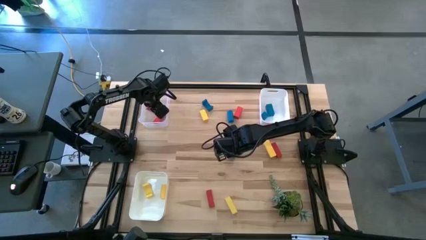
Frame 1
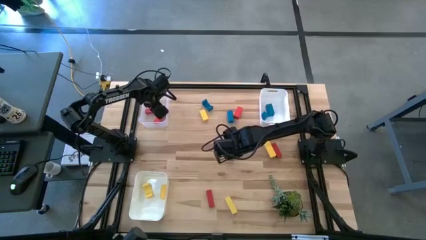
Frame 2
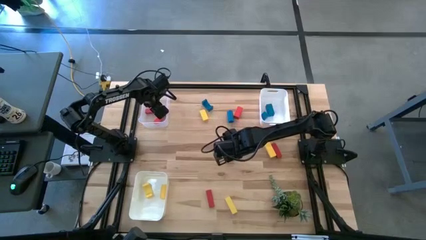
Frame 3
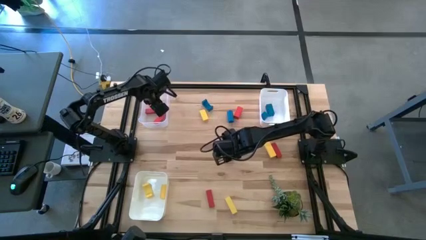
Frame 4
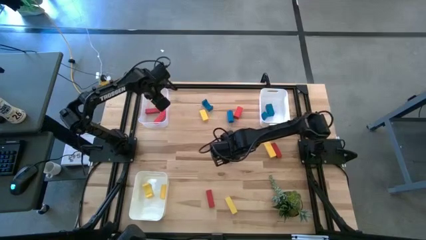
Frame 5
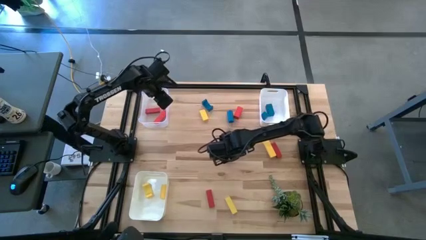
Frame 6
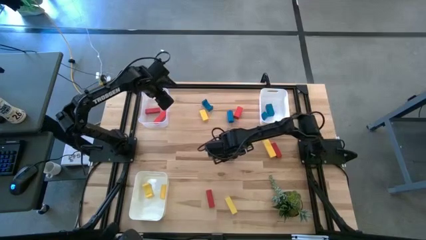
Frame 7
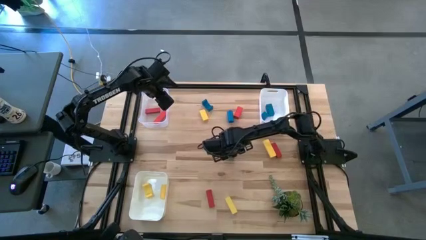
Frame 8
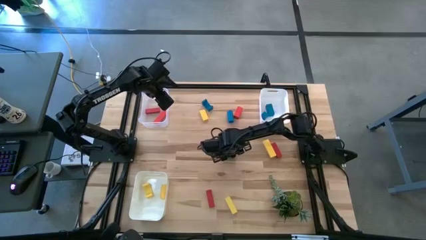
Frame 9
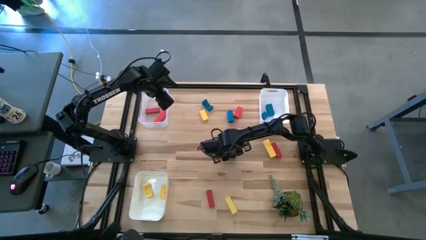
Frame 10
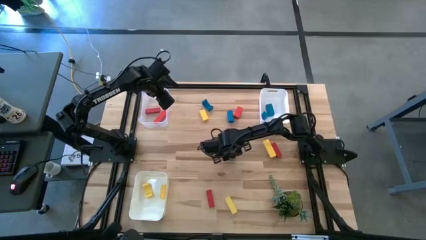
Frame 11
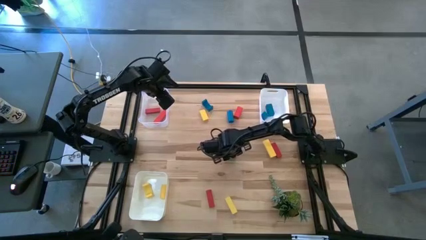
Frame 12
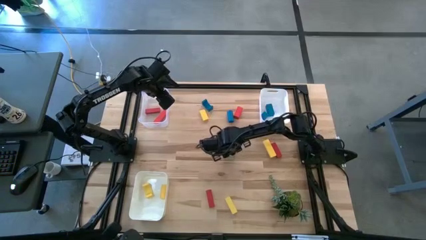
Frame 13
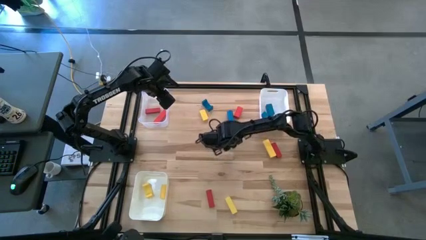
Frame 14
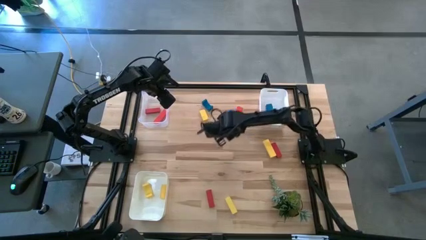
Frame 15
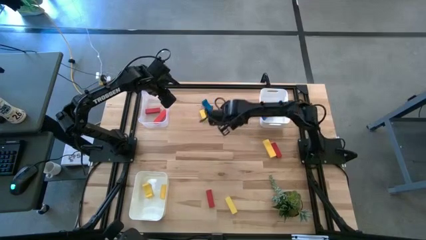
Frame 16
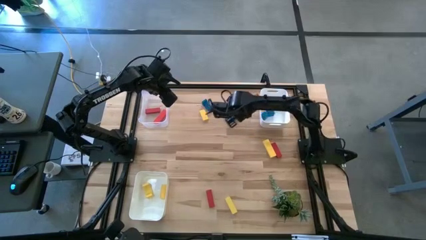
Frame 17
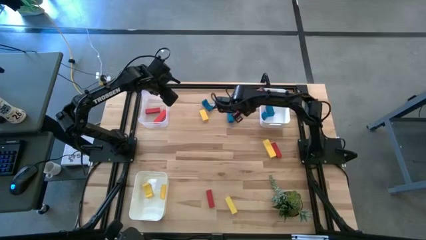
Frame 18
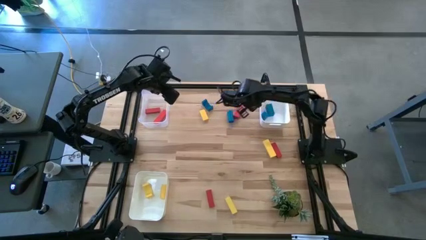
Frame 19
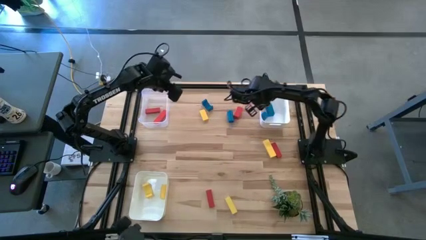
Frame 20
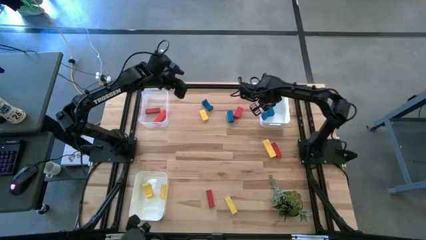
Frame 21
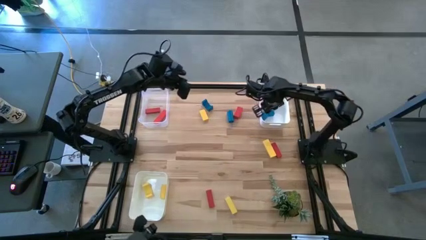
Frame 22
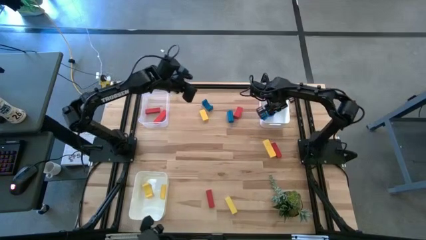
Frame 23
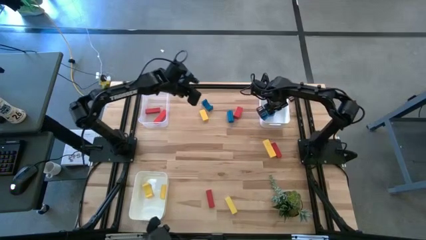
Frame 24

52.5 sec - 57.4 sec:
Task: Sort & place blocks by color
Put the blue block into the top white bin

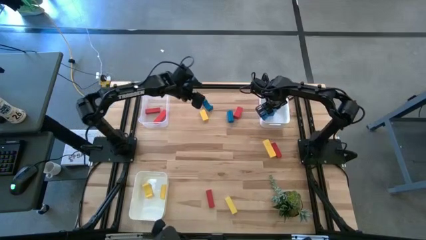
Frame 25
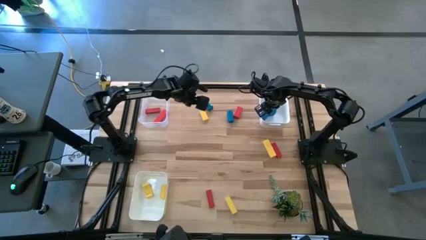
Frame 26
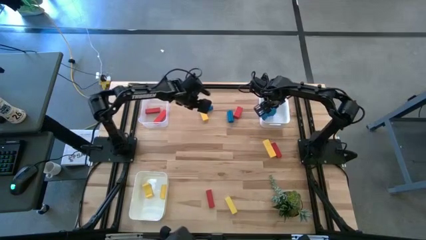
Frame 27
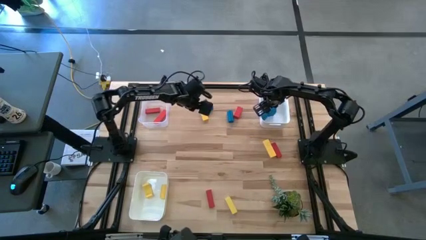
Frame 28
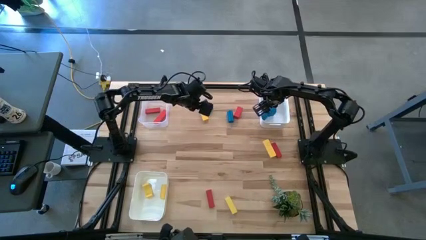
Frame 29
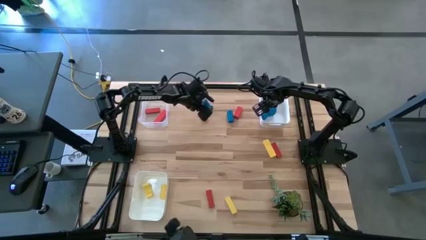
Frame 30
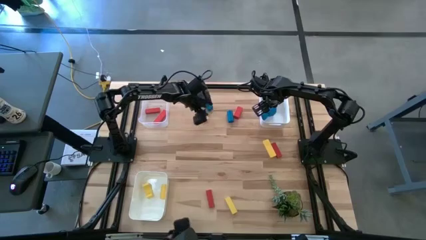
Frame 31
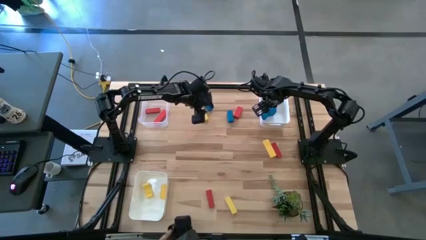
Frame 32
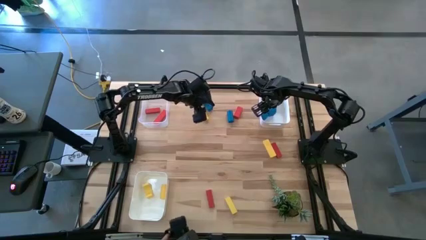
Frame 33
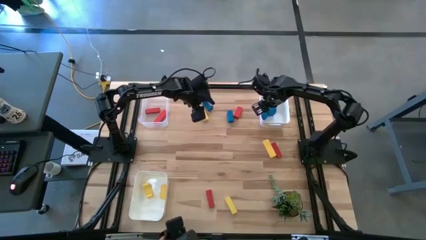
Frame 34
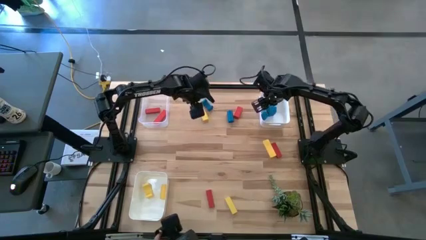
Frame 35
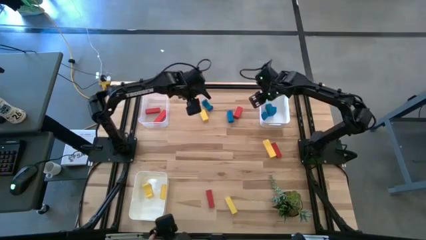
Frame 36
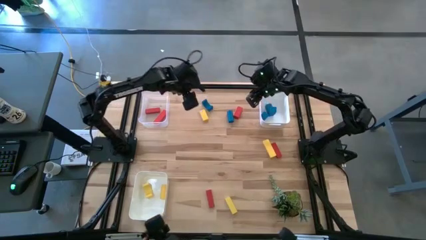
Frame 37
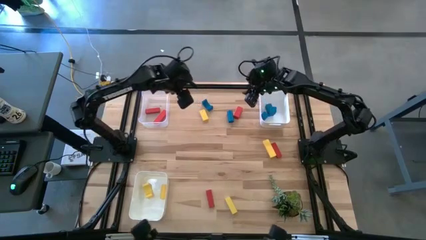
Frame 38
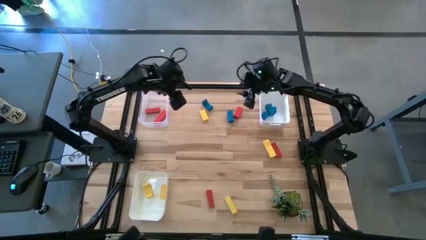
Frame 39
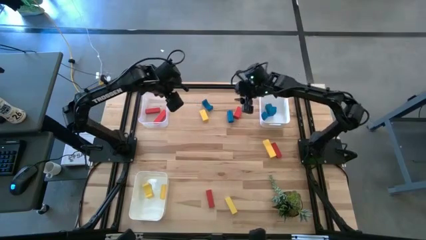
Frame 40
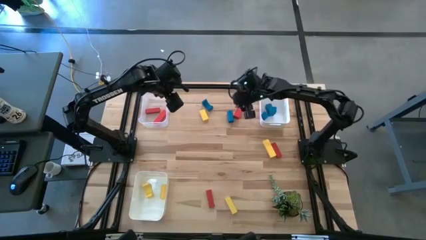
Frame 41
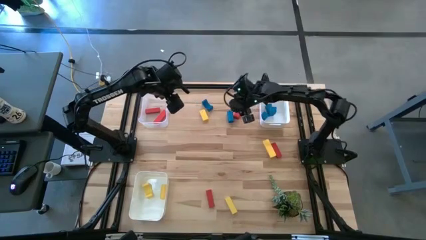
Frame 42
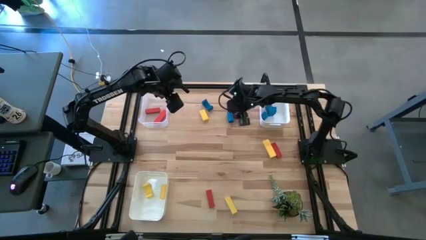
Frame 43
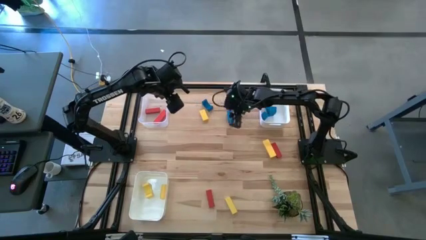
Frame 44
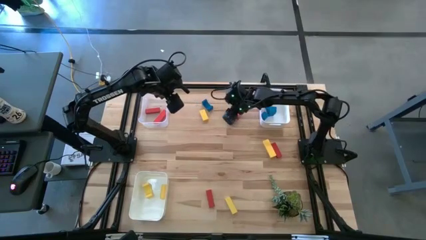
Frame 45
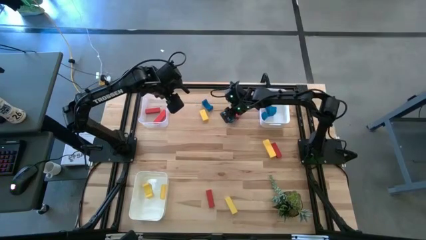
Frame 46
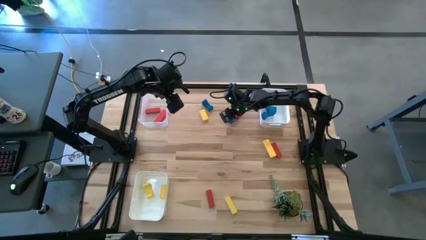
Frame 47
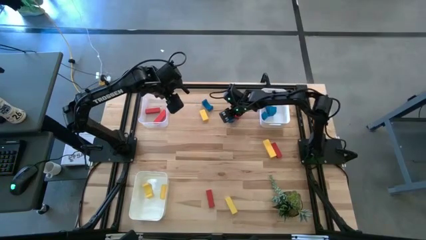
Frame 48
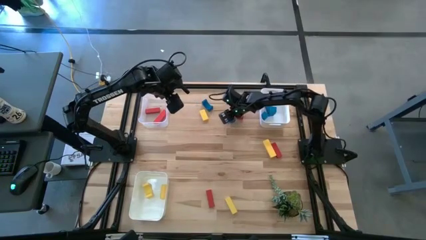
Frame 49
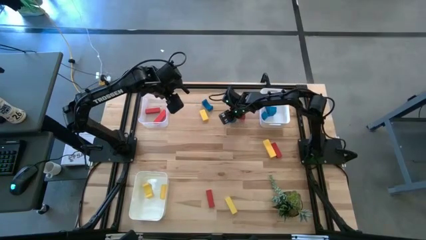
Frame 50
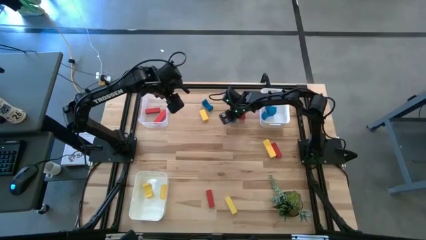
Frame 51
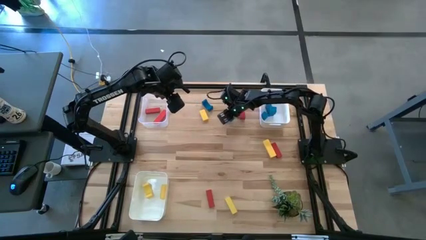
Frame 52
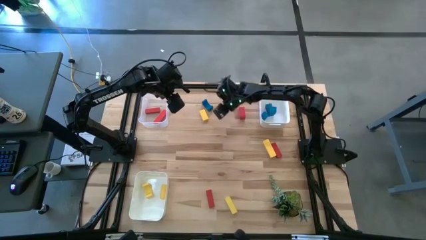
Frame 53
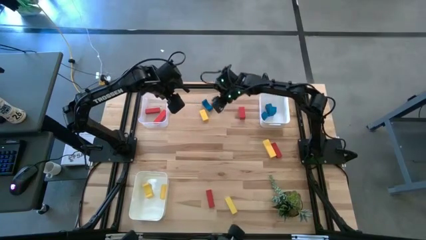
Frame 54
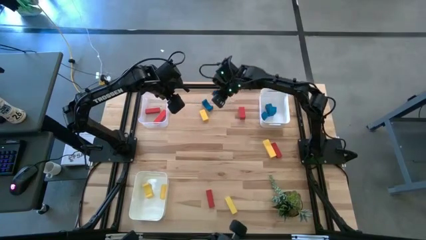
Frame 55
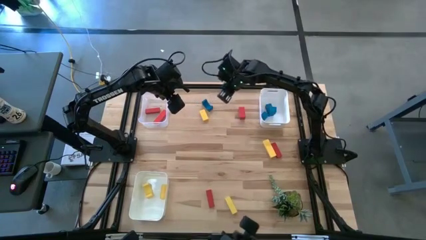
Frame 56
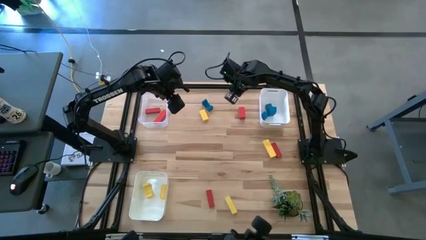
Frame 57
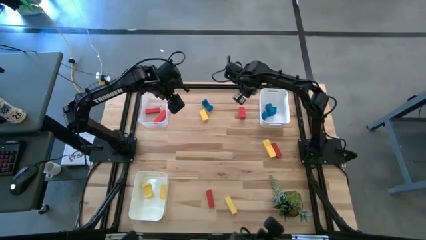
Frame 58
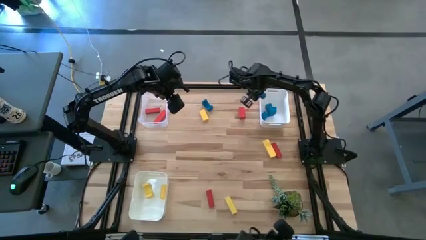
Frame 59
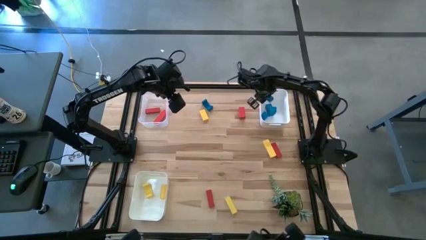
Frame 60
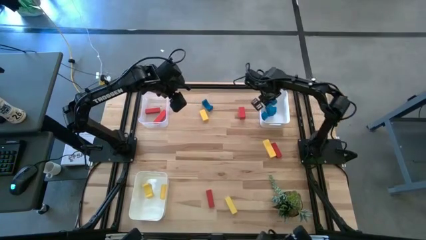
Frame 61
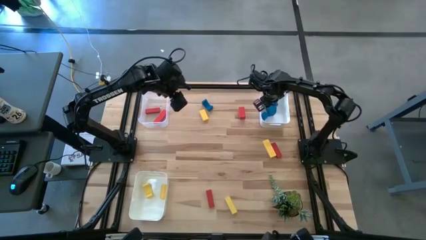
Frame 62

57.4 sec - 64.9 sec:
Put the blue block into the top white bin

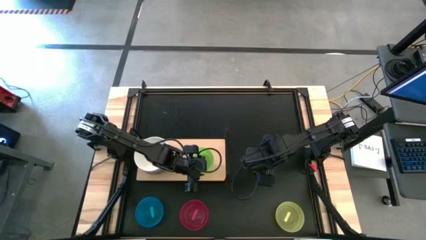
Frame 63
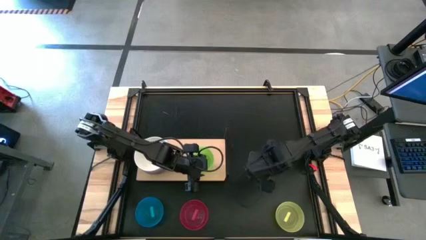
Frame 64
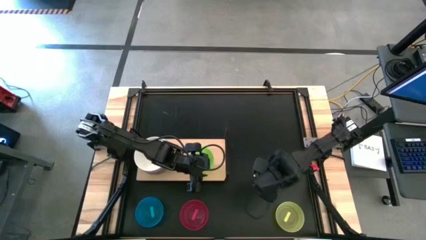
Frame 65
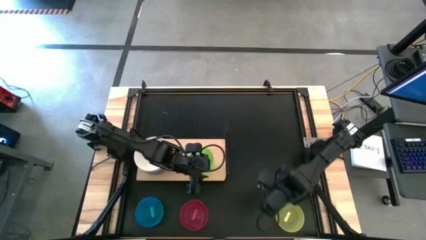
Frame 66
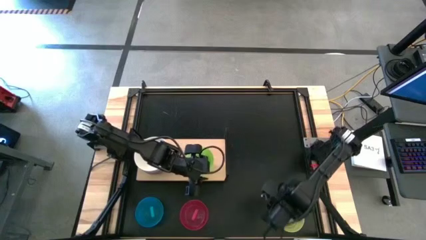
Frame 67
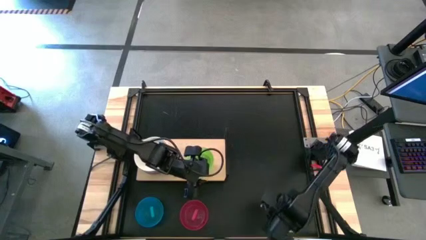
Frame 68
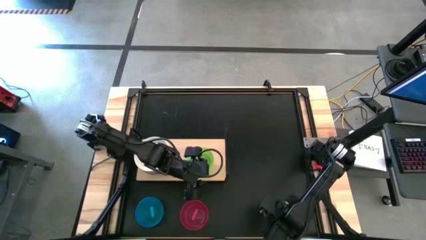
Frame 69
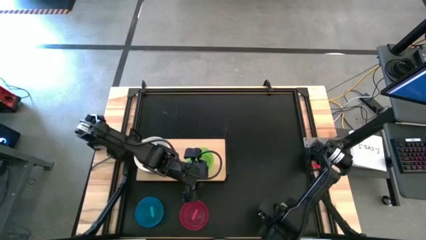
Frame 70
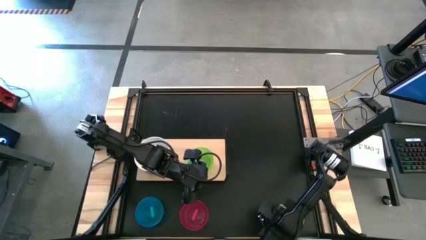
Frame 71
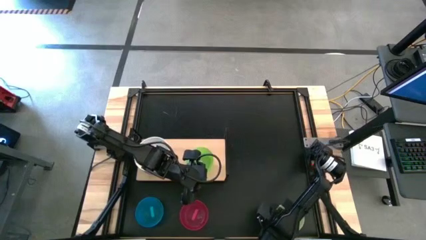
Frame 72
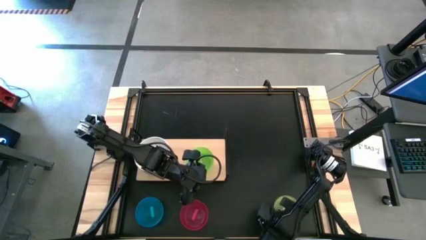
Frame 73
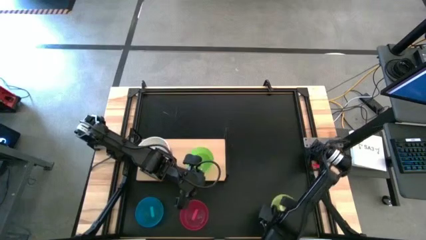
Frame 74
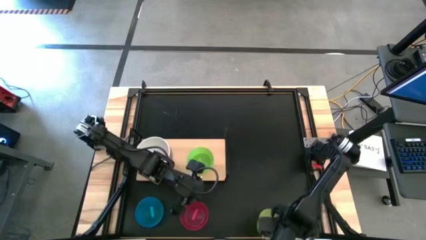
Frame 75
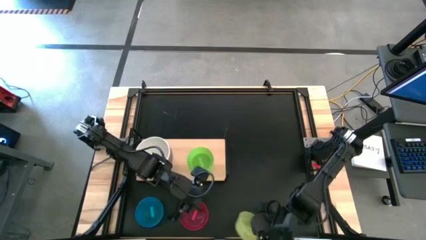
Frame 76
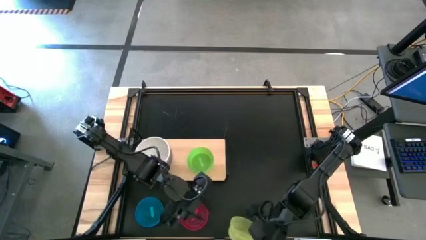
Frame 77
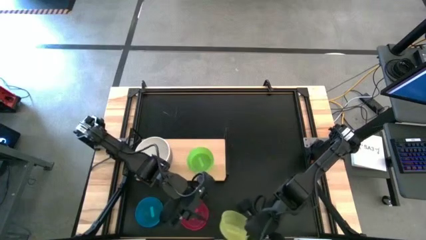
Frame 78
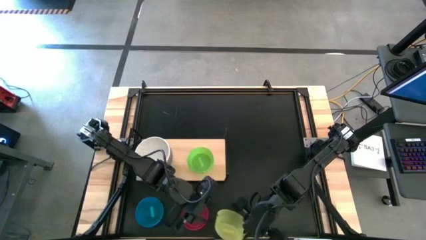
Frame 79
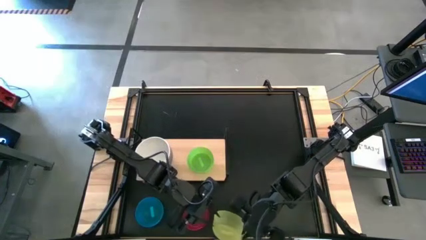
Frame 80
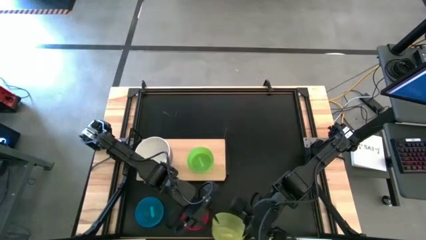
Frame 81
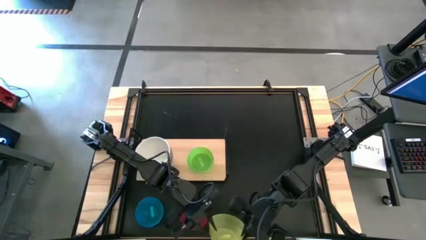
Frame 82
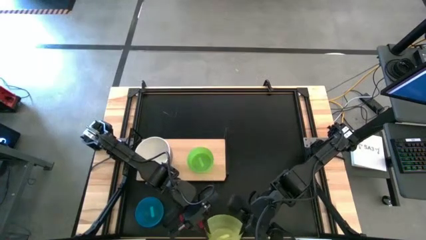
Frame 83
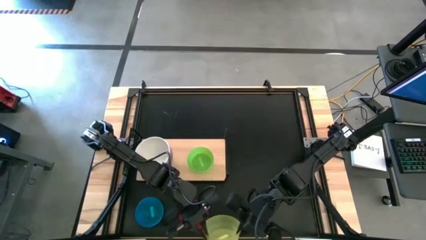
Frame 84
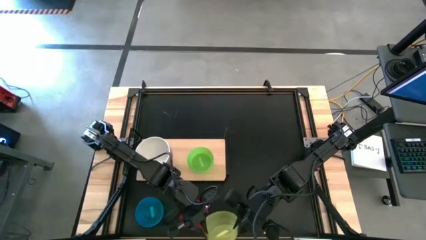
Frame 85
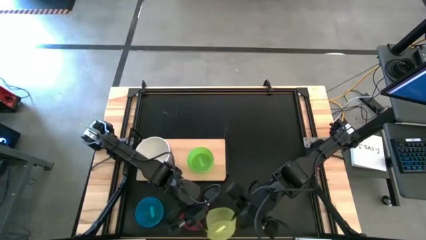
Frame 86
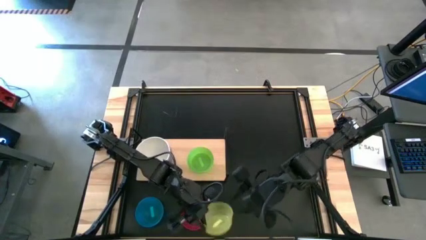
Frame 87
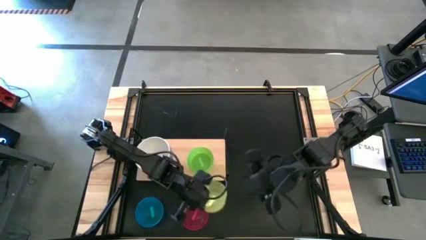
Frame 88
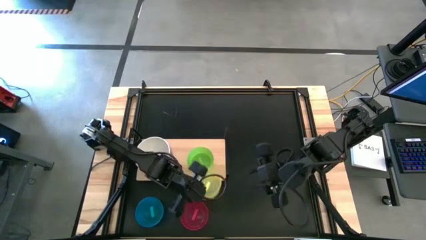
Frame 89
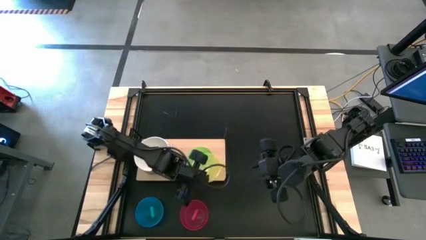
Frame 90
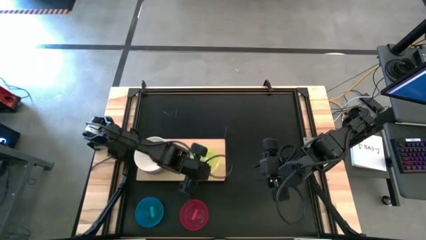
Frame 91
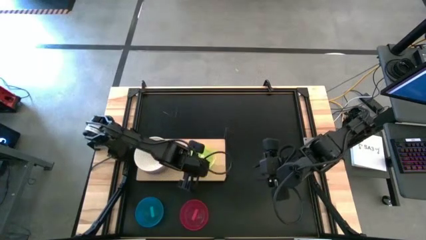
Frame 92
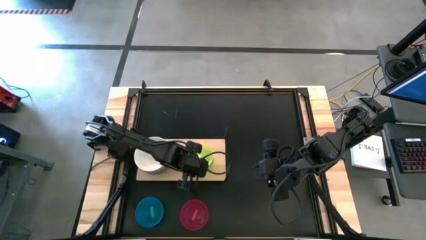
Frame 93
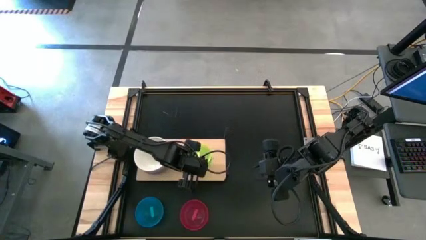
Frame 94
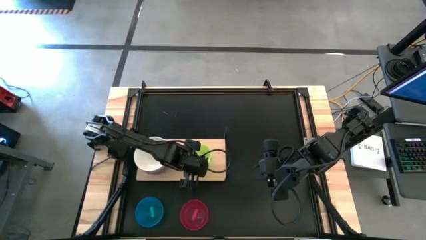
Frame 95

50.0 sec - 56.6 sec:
Task: Place and stack bowls onto a shelf
Stack the yellow bowl on top of the small green bowl on the shelf
